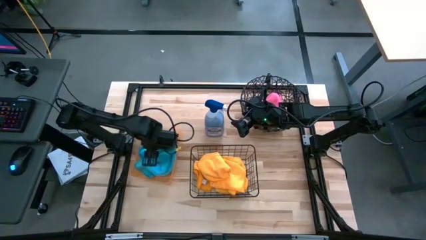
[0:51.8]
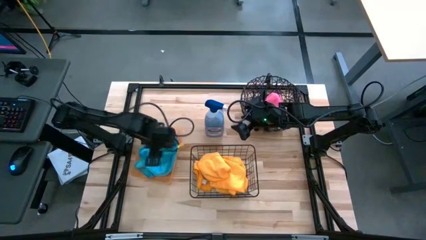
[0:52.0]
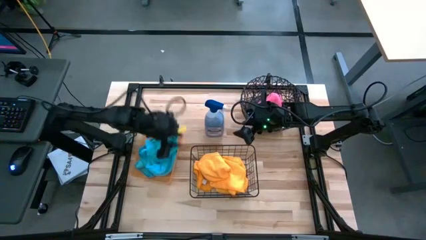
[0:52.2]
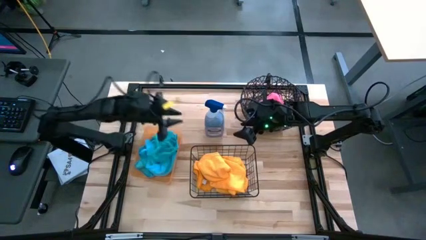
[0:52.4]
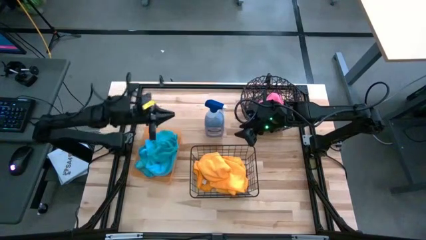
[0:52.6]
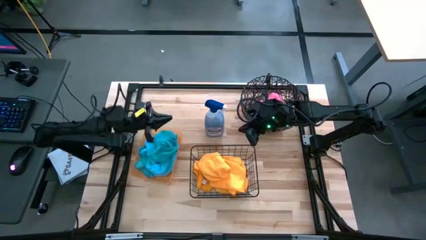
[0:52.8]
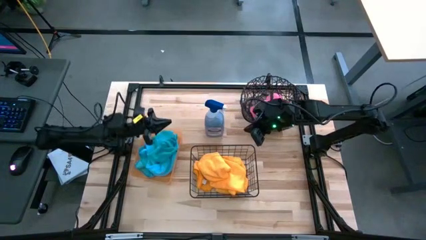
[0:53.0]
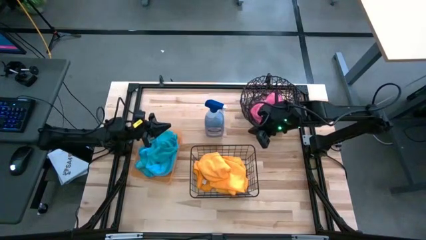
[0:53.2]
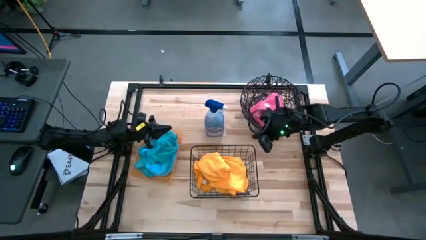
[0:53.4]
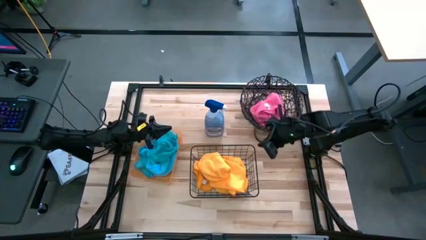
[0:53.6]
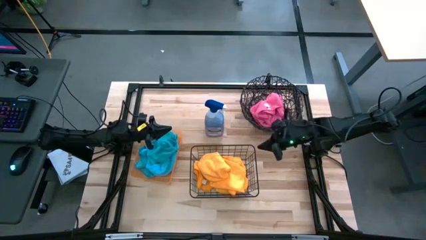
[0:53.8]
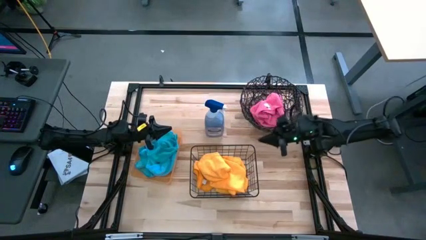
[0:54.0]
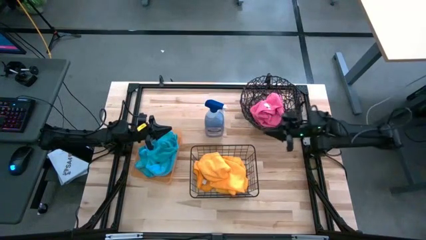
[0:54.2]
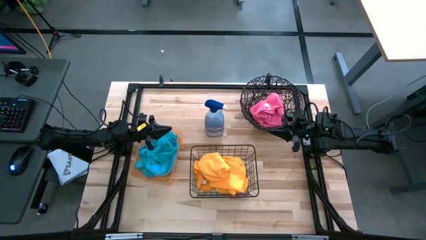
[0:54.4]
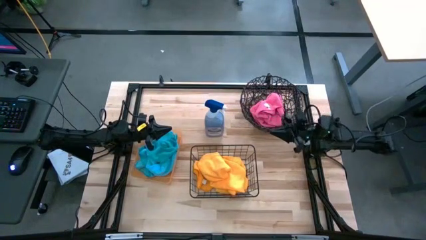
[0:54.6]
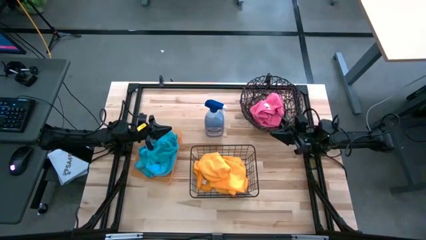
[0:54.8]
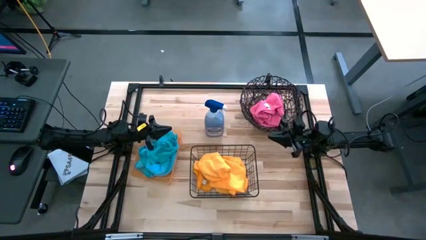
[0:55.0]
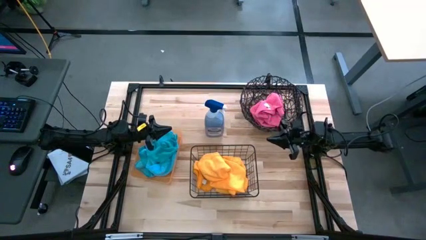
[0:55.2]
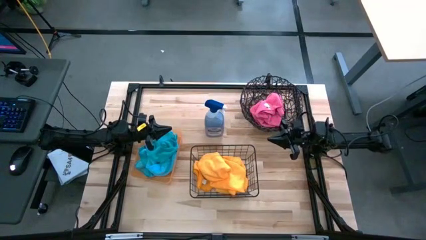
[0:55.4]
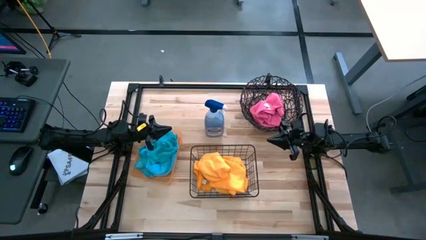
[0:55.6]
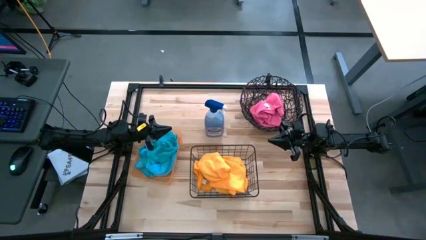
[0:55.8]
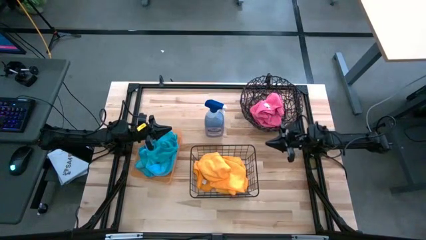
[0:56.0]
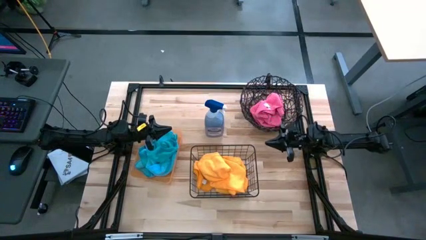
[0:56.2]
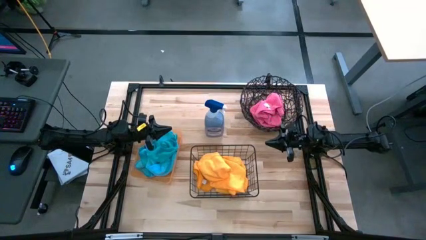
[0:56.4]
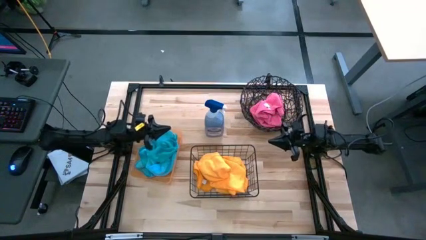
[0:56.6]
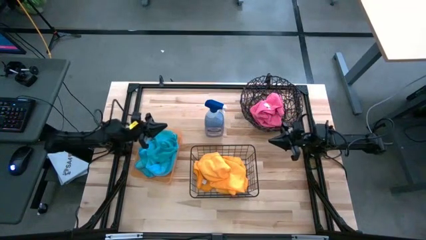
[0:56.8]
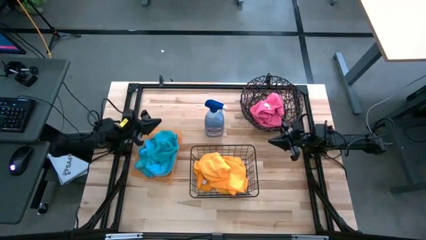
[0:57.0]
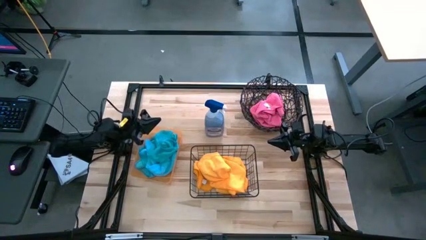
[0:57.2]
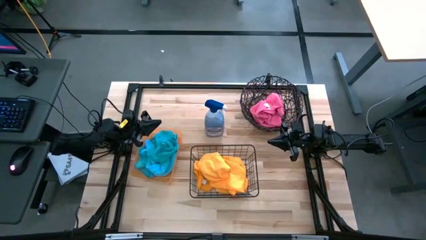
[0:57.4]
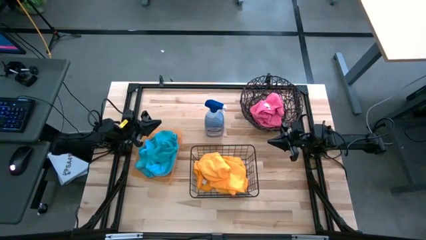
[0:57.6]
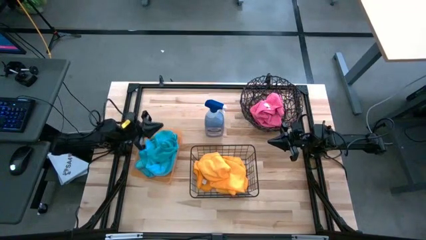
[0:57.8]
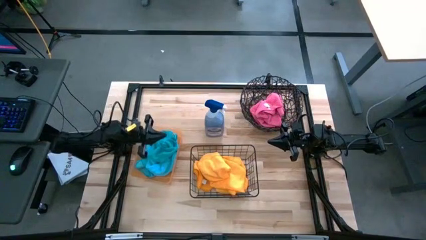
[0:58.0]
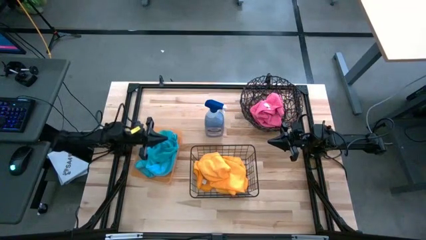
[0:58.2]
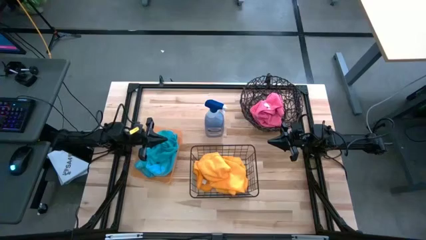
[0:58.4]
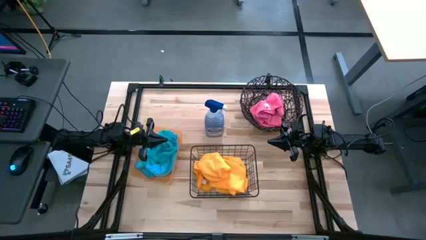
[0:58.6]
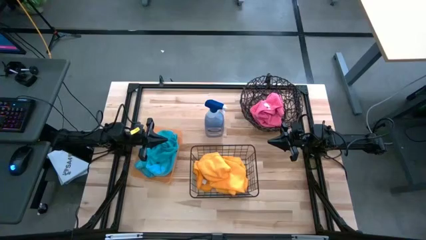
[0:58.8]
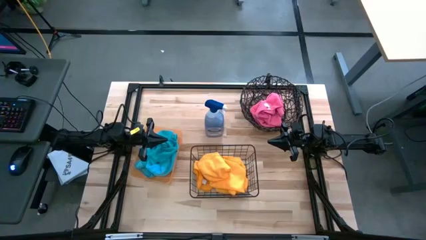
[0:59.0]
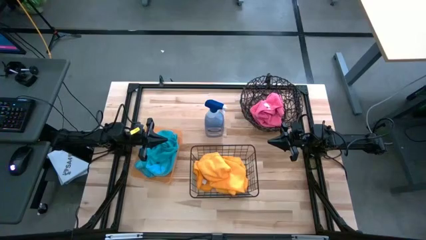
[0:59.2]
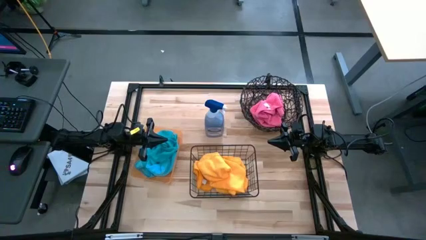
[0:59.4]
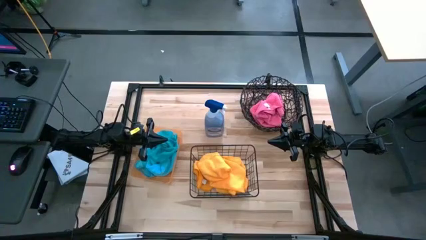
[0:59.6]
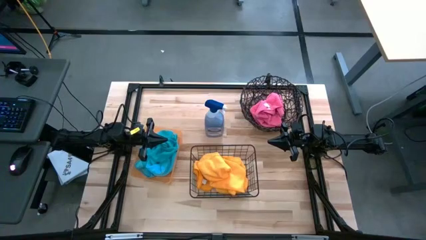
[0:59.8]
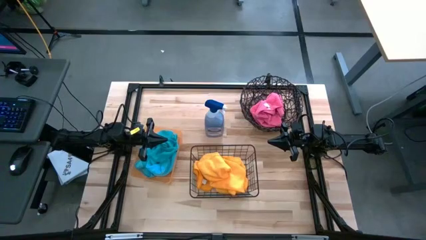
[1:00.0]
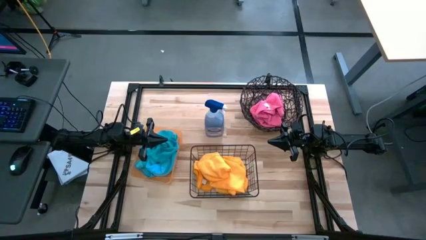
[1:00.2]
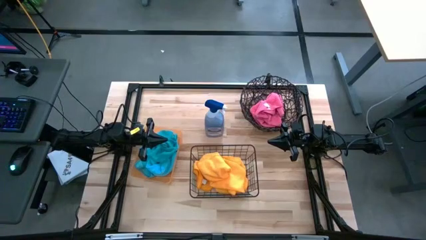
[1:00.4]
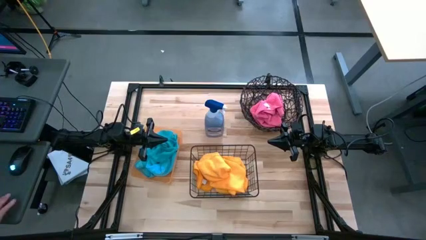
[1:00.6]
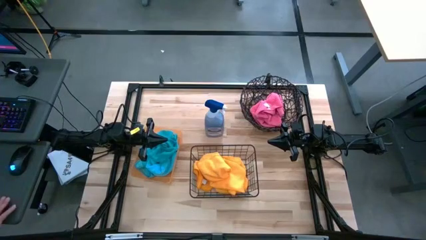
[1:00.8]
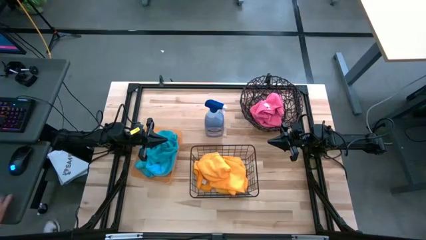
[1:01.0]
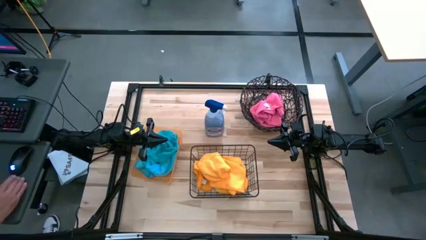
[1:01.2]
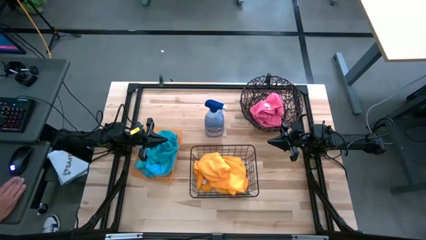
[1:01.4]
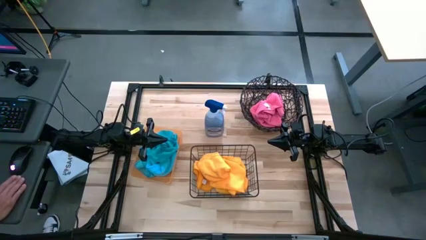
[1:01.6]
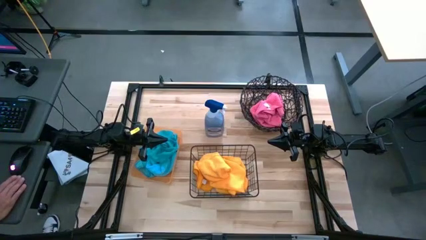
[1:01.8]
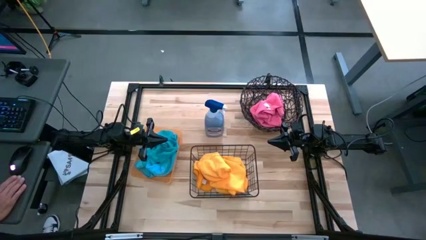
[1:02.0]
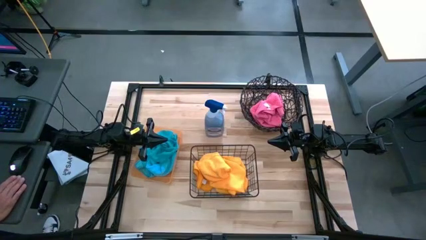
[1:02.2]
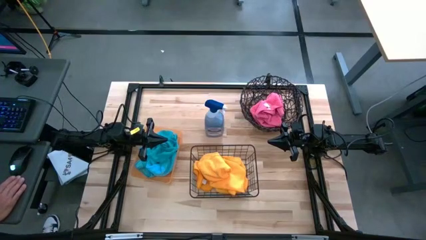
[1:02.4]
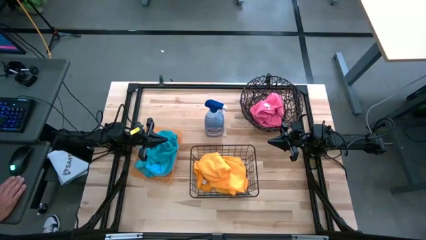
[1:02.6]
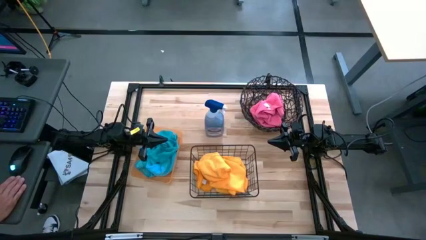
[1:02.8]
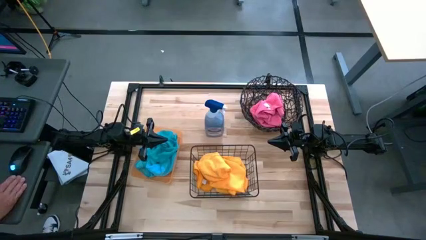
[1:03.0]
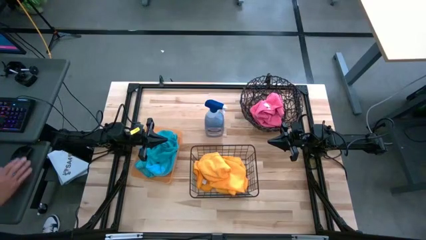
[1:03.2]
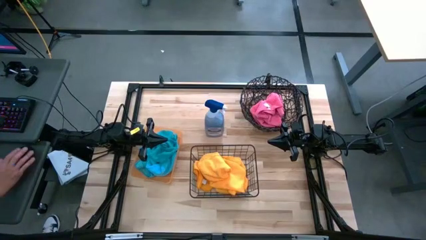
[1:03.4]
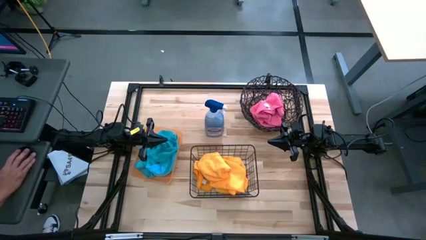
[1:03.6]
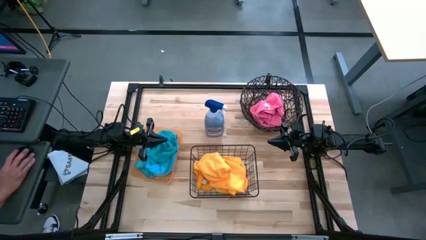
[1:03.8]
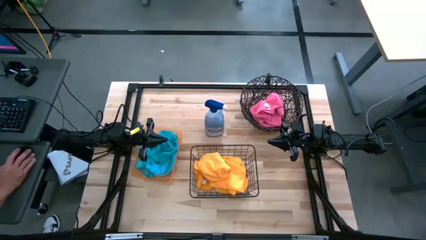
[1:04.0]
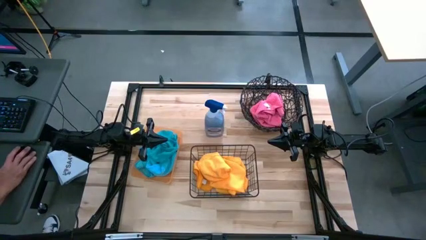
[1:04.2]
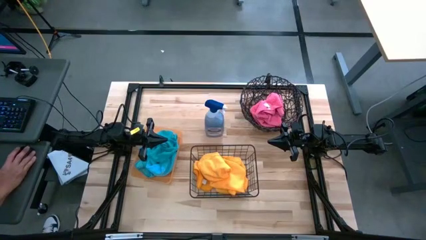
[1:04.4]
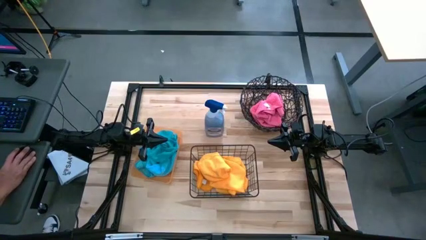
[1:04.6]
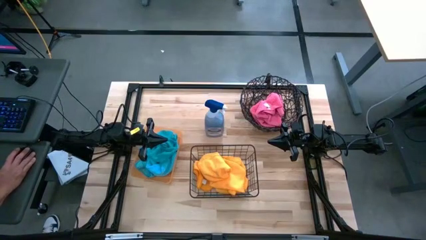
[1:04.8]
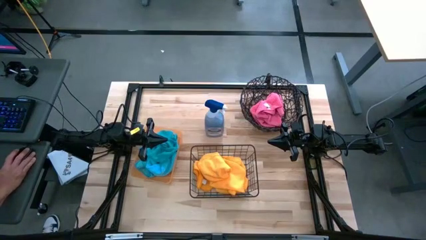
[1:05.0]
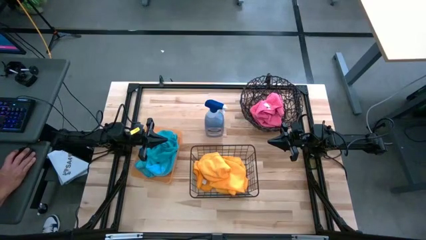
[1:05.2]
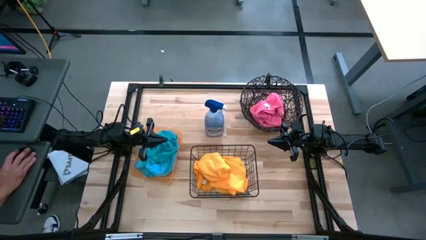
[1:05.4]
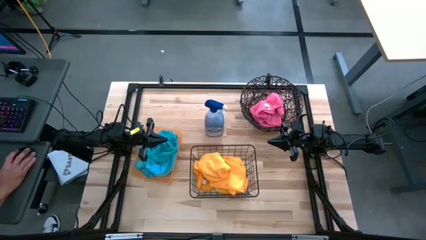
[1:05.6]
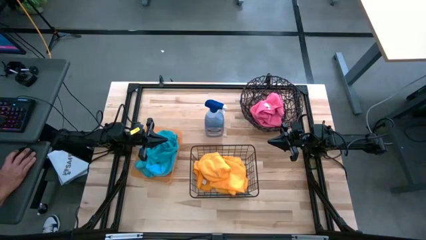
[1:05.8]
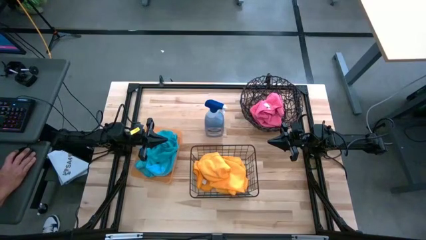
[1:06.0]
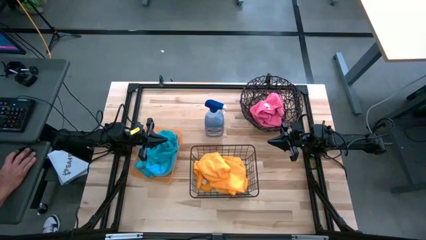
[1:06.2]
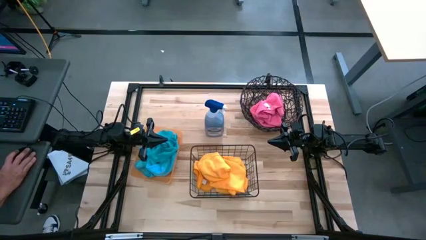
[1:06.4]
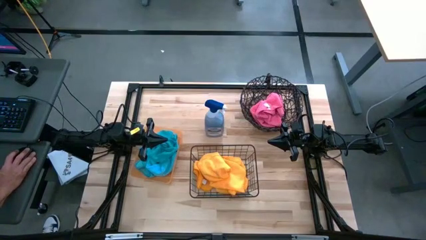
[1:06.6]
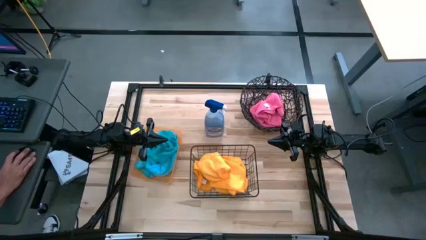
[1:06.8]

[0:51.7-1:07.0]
Task: Sort microfiber towel by color & place in baskets
Return to home position
